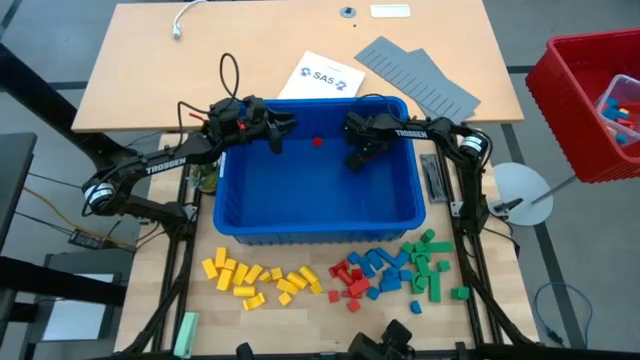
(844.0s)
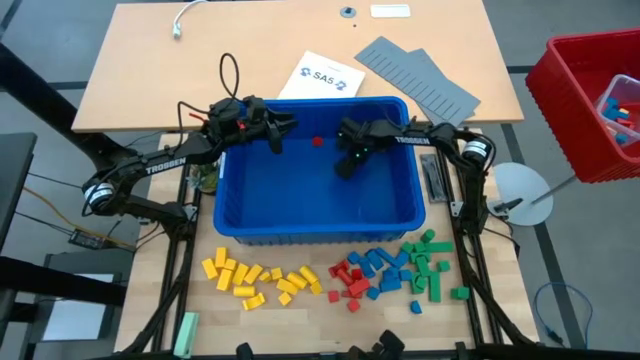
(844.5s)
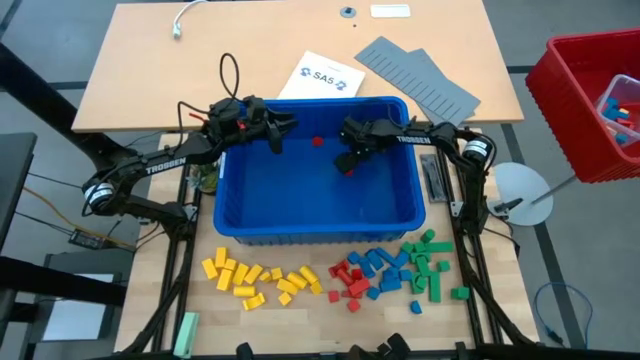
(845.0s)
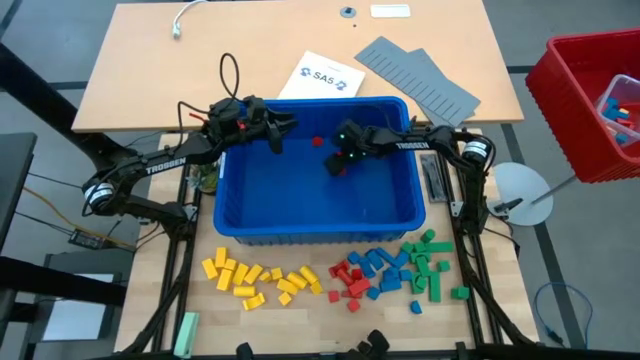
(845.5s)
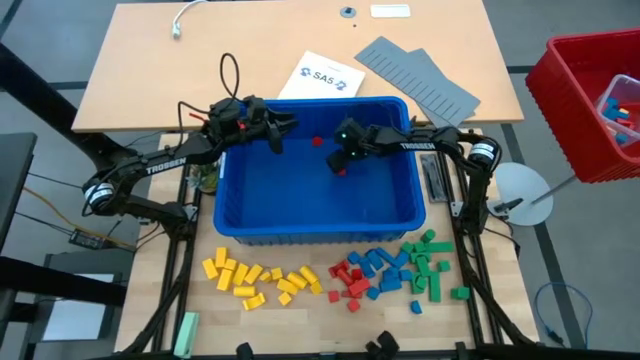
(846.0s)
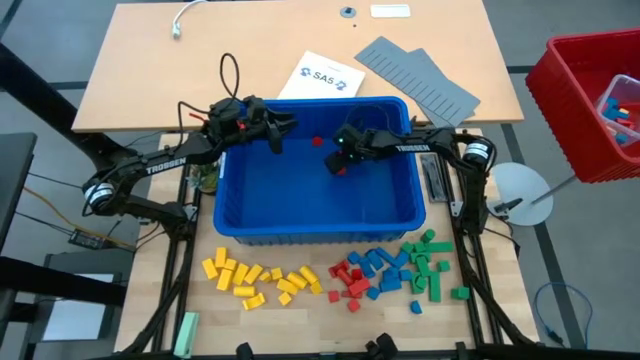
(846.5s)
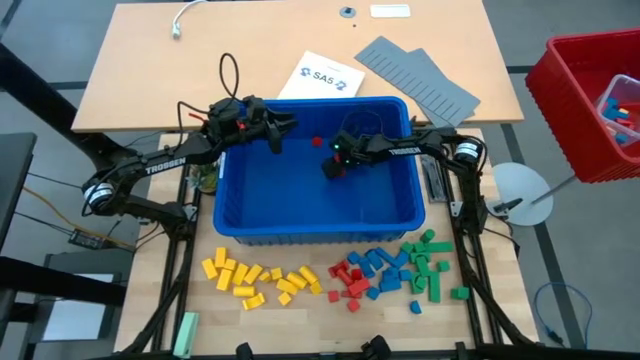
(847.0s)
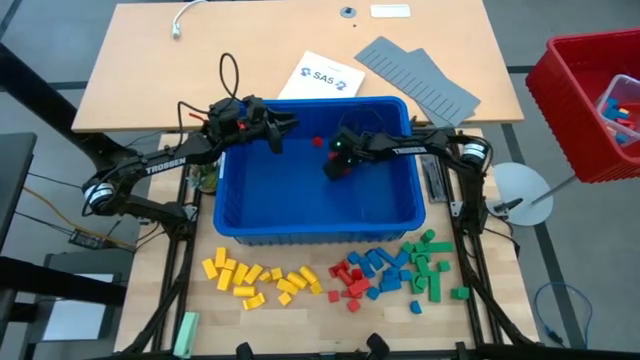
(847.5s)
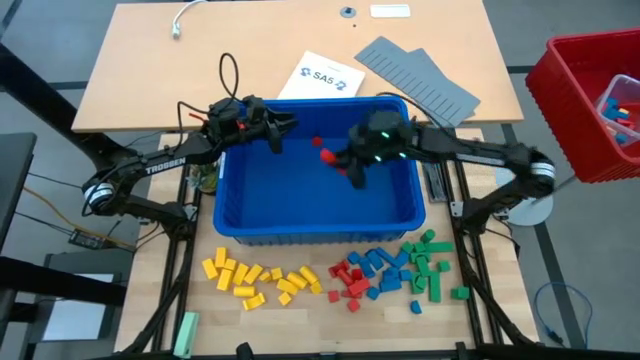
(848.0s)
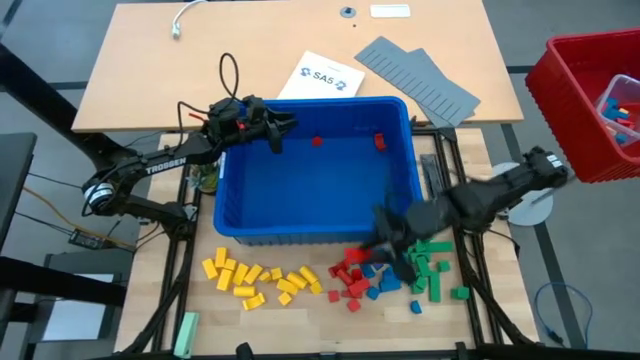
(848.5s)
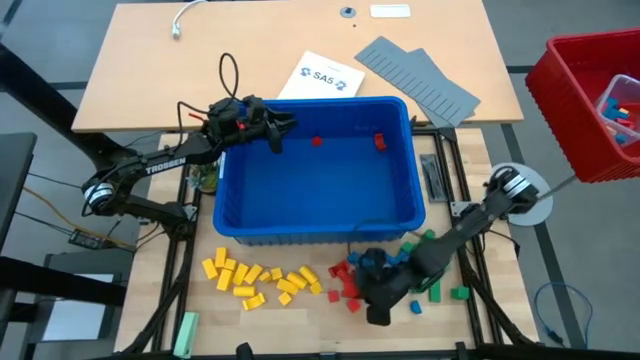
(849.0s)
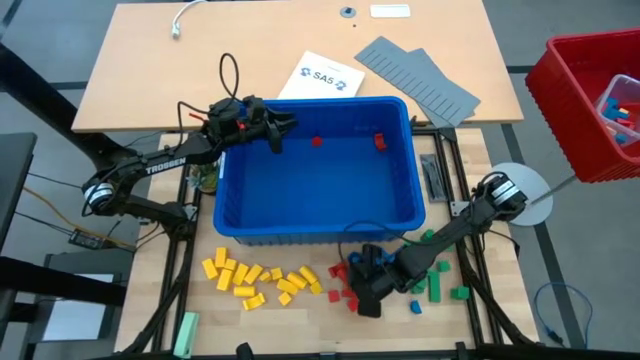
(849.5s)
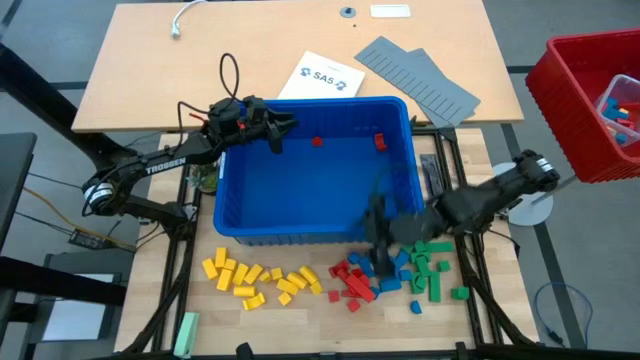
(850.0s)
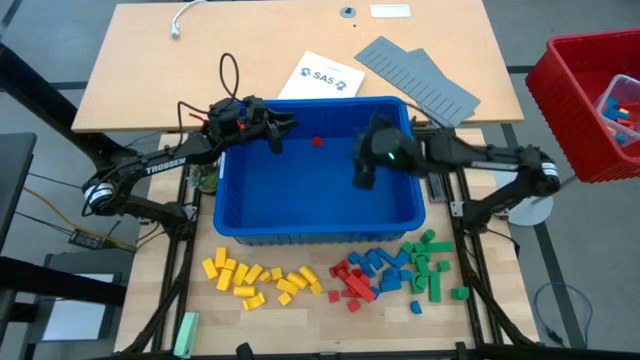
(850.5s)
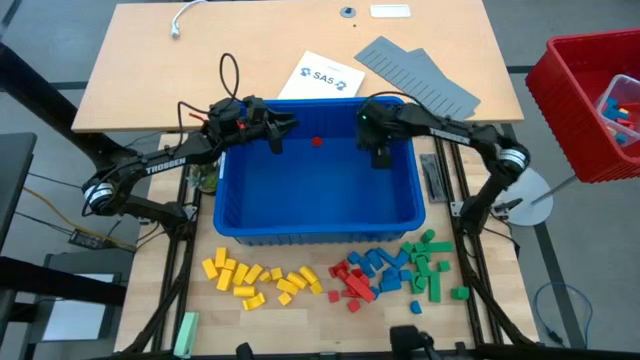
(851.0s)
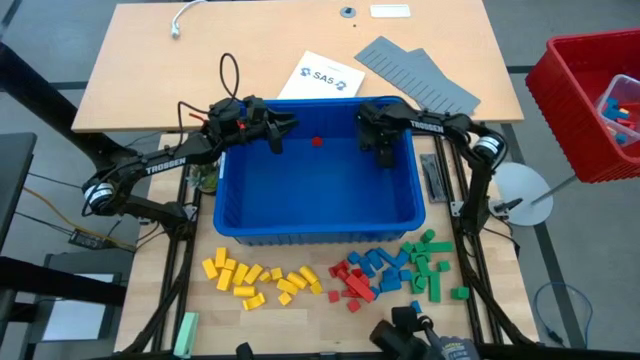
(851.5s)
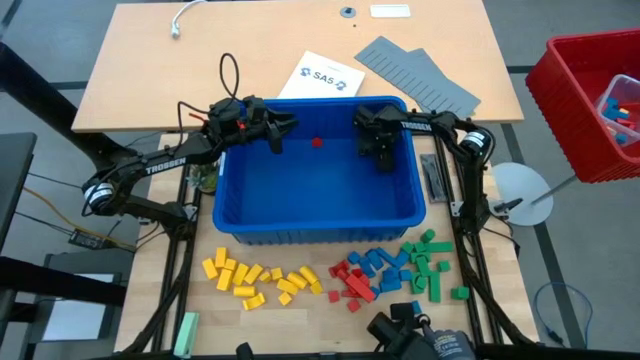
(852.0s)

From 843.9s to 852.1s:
Task: Sort blocks
Remove the red block from the blue bin

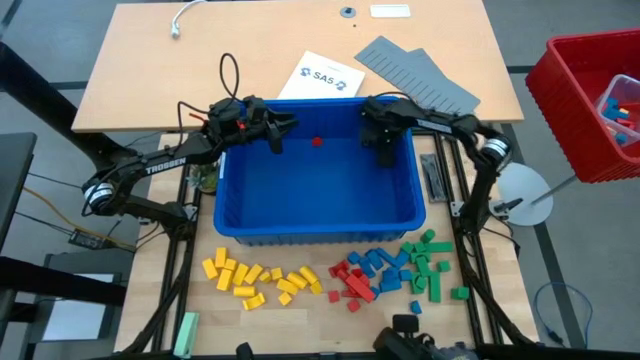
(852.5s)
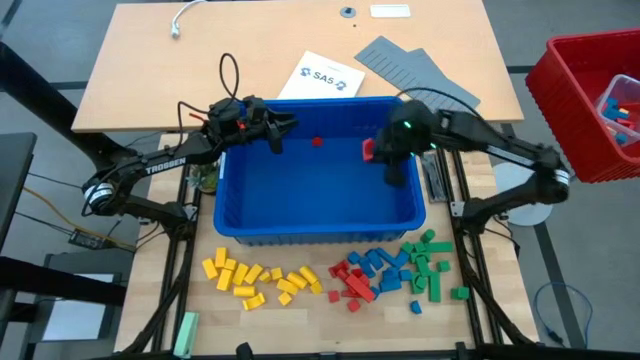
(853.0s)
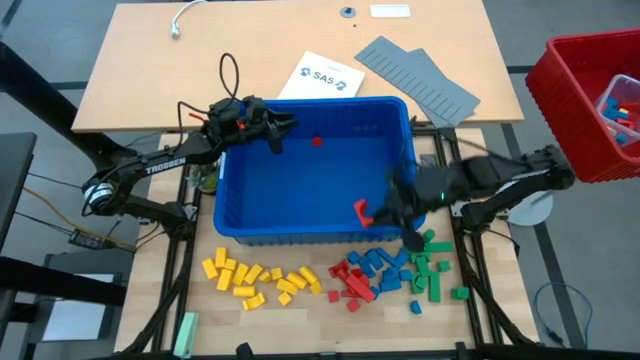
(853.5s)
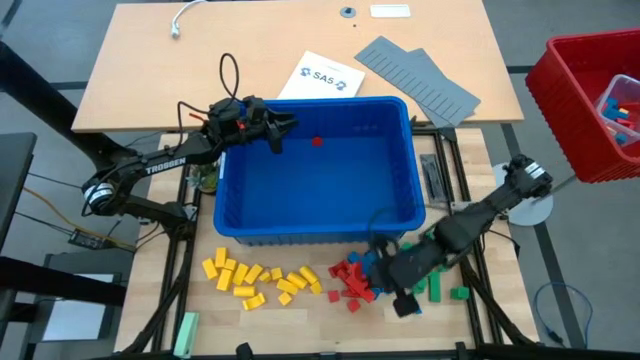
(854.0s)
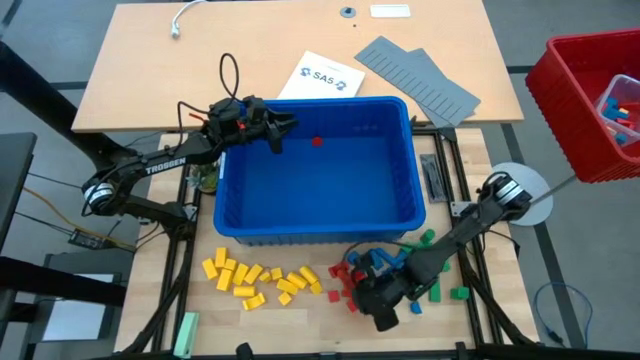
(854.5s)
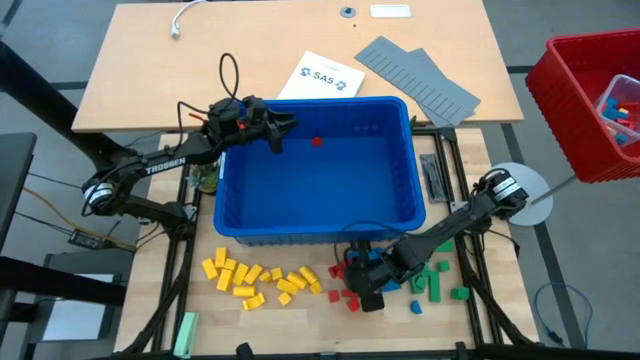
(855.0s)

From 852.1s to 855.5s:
Remove the red block from the blue bin

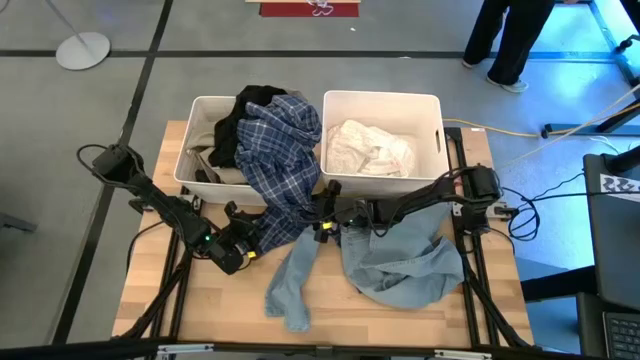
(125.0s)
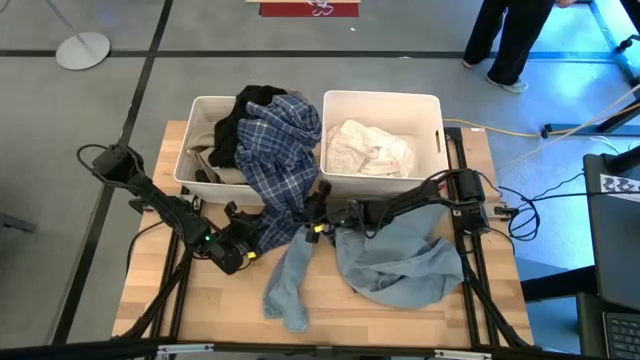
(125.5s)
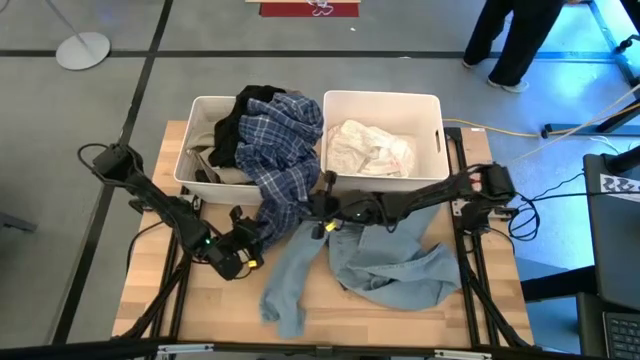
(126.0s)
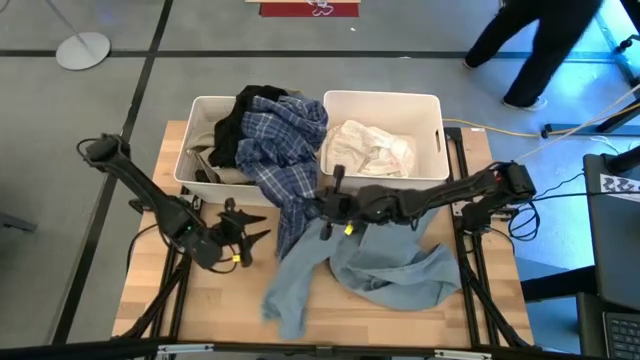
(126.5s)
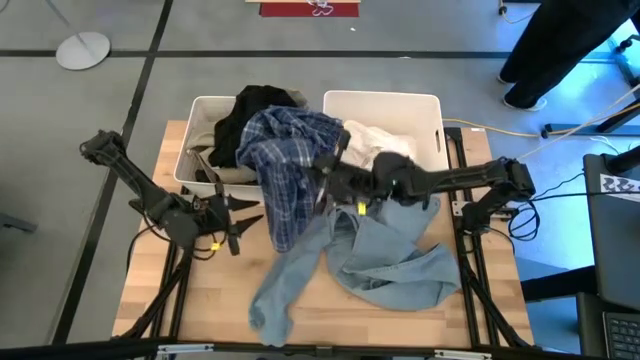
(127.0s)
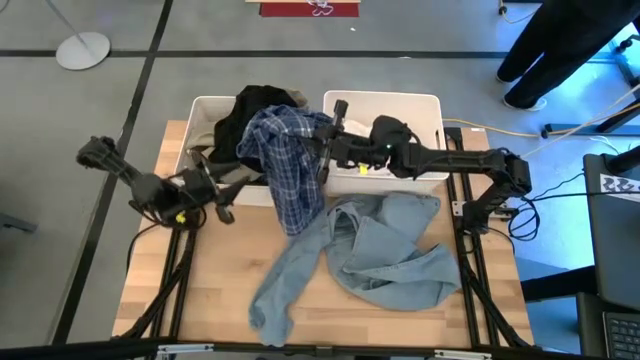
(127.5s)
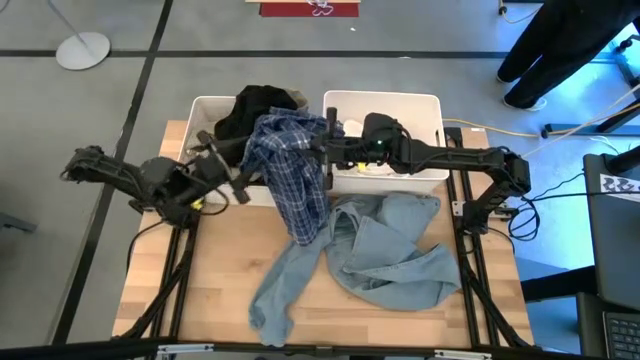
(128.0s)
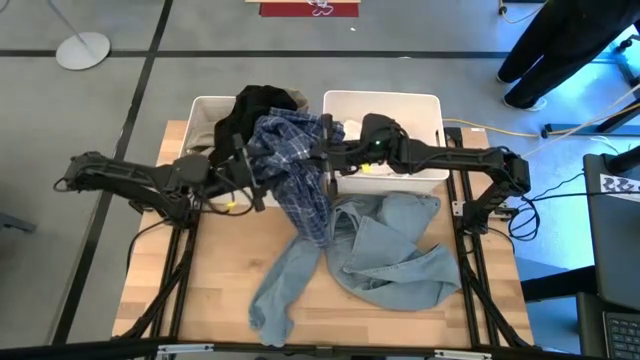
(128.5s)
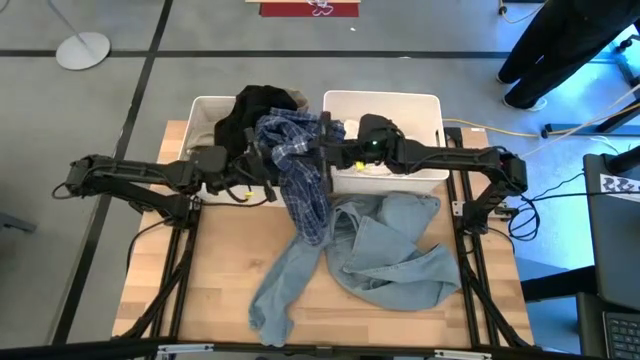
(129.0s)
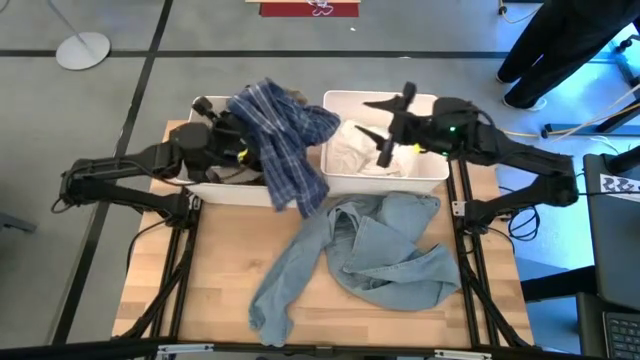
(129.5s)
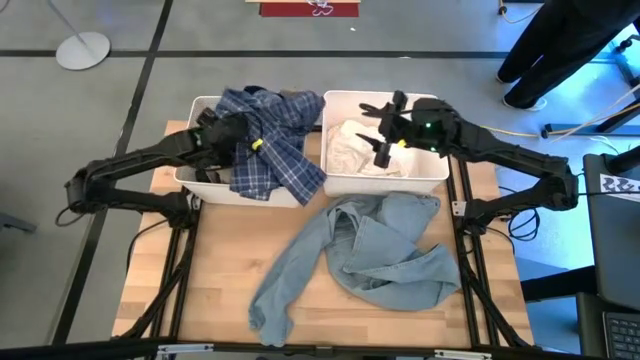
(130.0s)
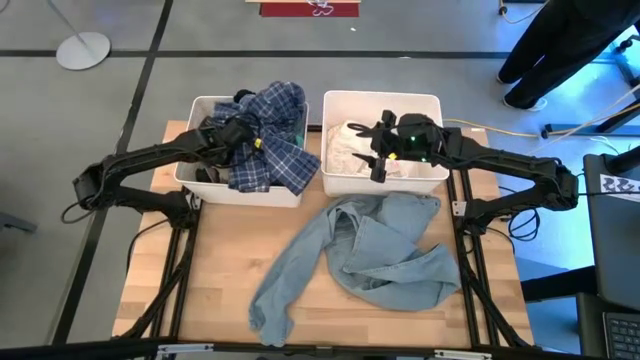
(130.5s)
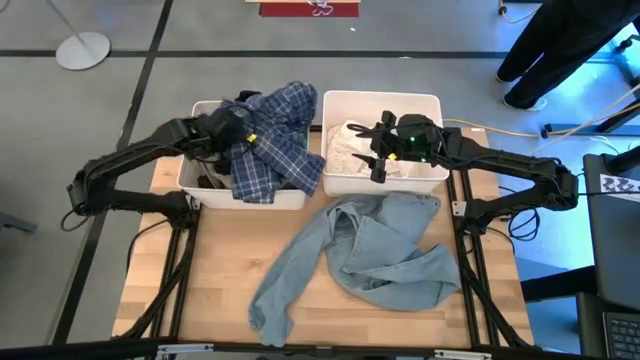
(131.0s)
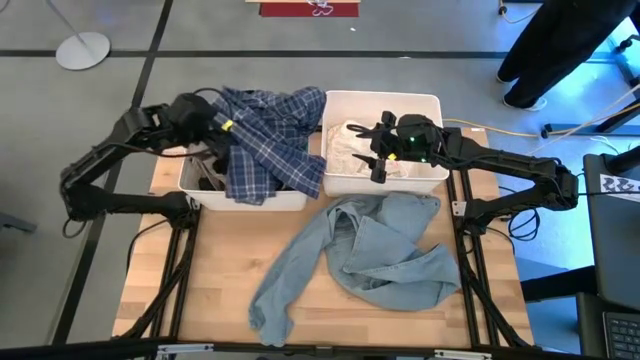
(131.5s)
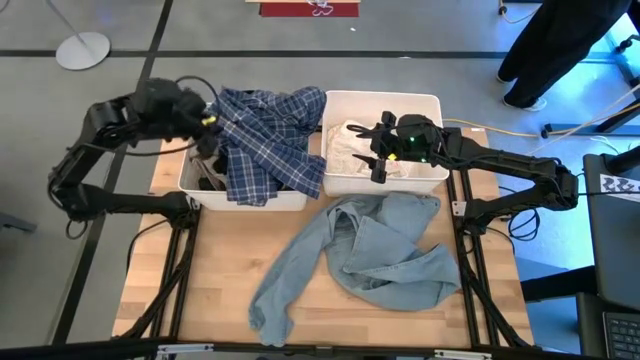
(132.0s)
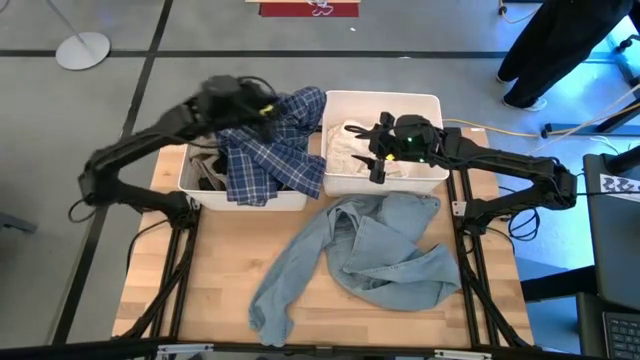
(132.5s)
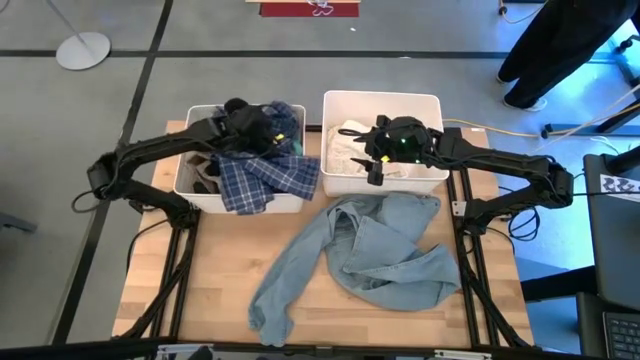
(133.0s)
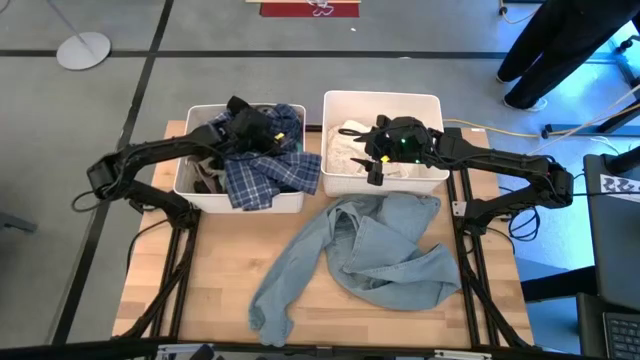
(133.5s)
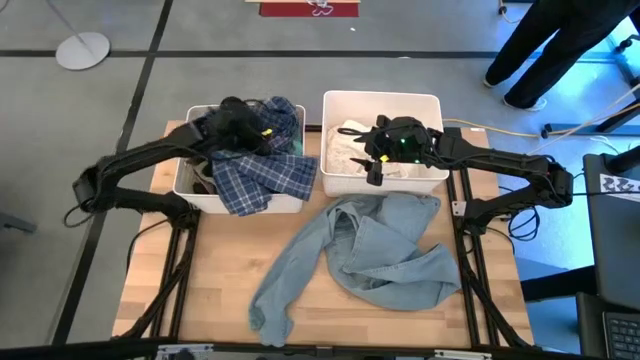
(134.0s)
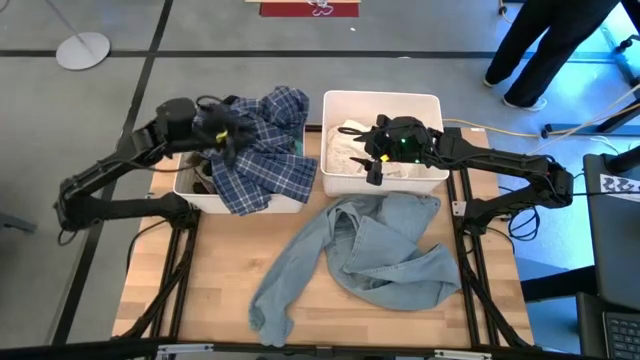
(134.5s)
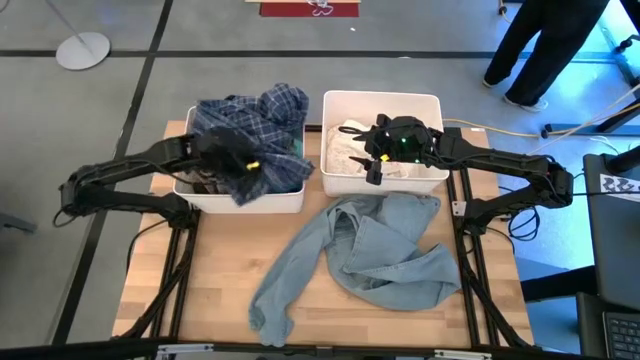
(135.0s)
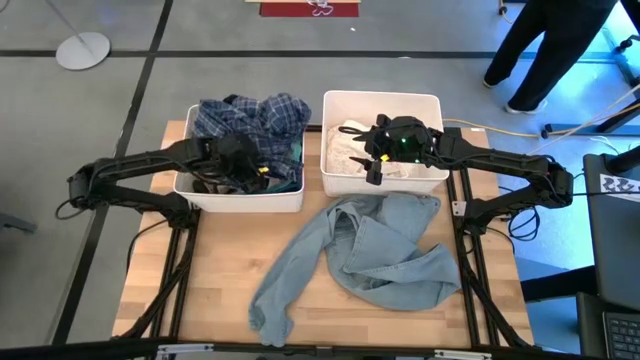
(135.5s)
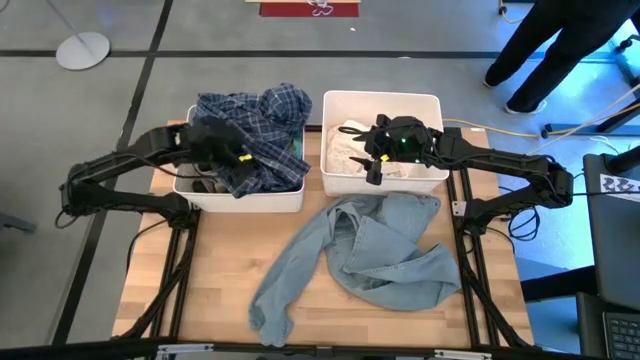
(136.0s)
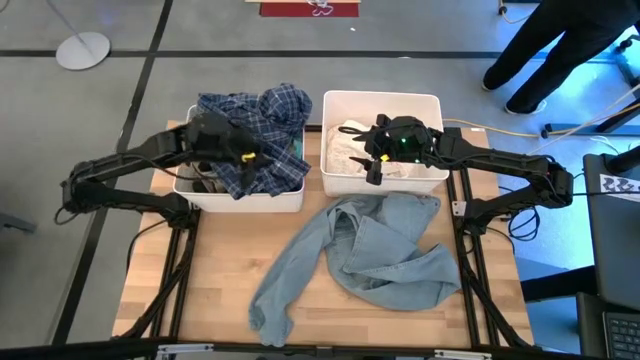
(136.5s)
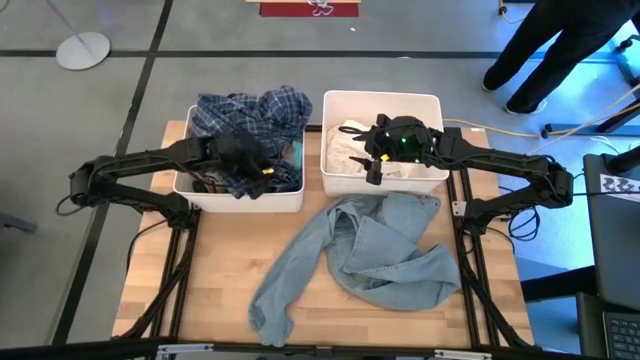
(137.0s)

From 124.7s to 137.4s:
Task: Sort clothes
Put the blue checkered shirt into the left white bin
